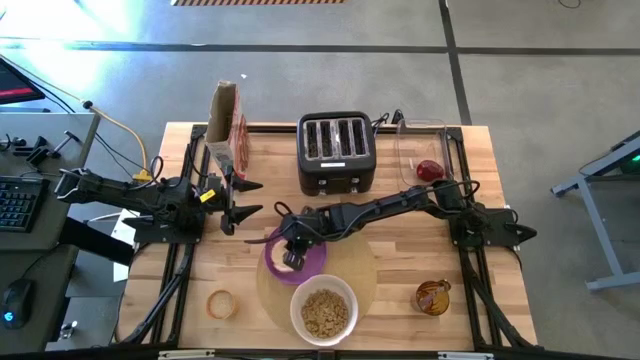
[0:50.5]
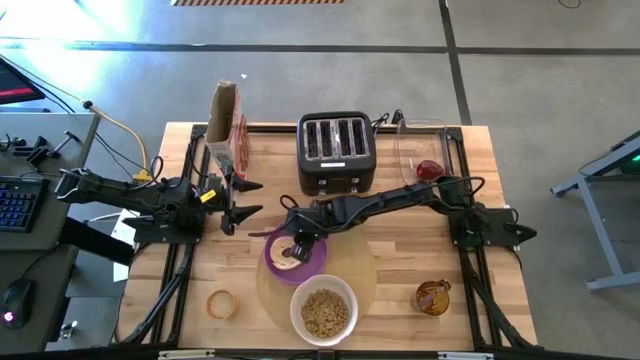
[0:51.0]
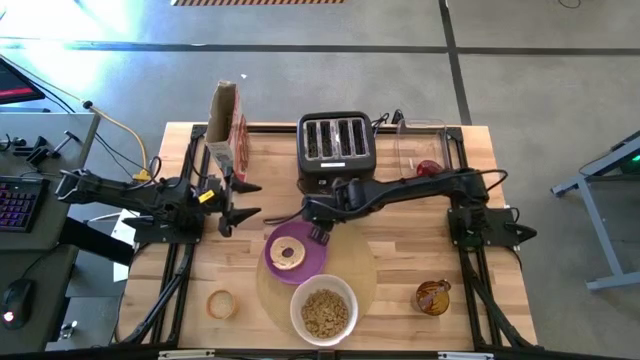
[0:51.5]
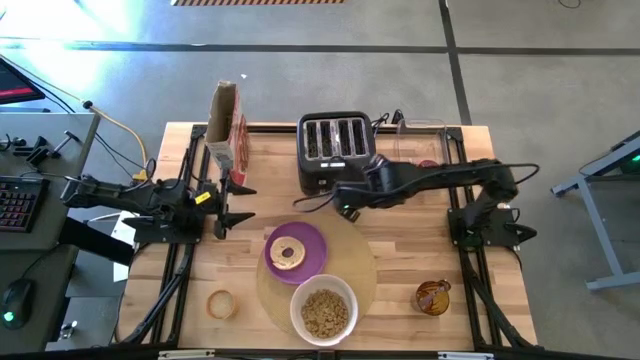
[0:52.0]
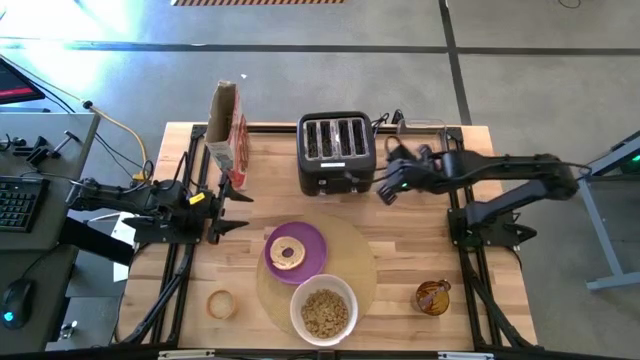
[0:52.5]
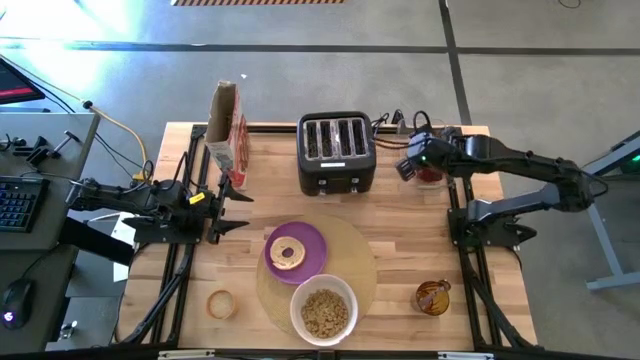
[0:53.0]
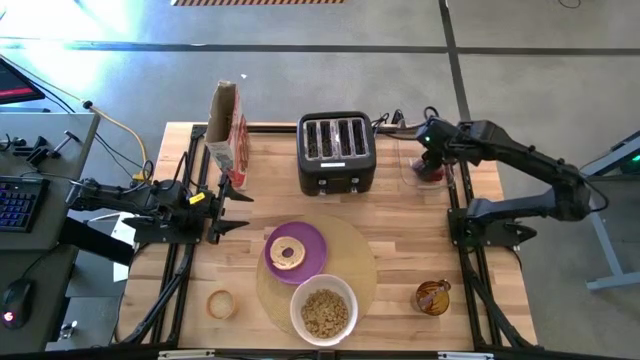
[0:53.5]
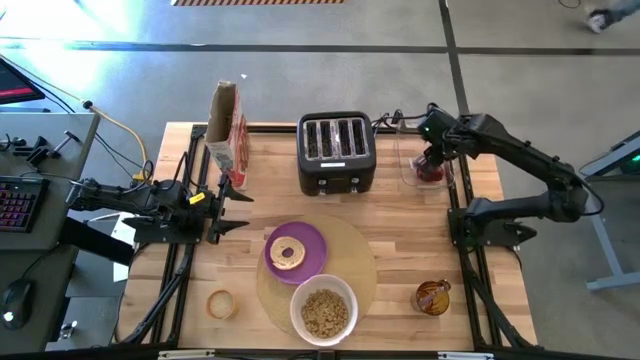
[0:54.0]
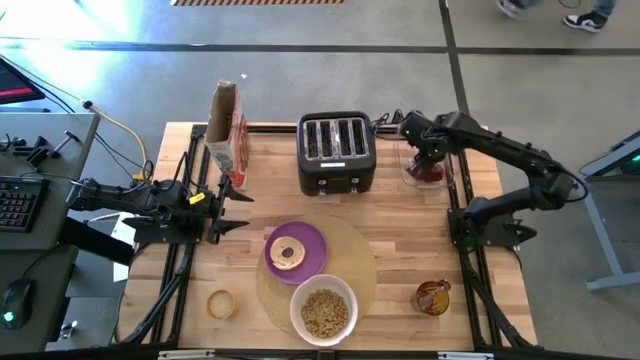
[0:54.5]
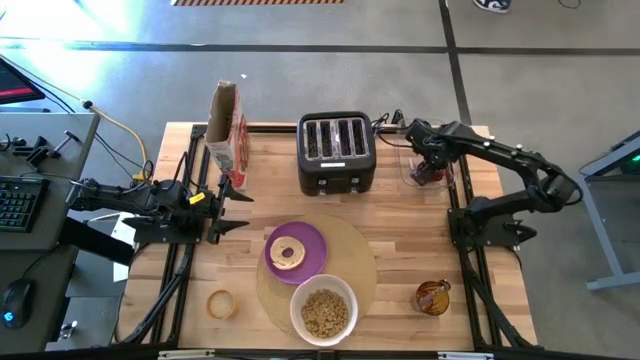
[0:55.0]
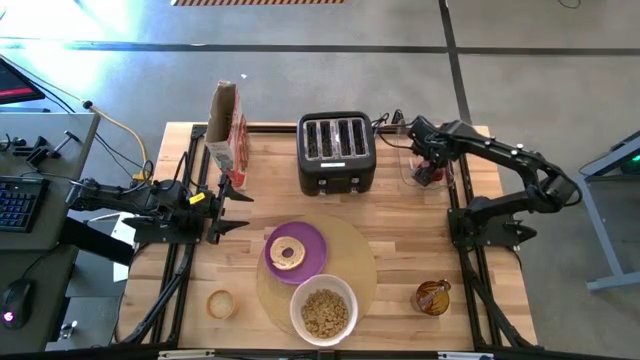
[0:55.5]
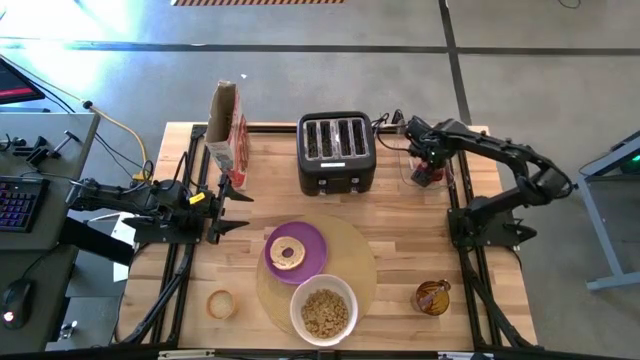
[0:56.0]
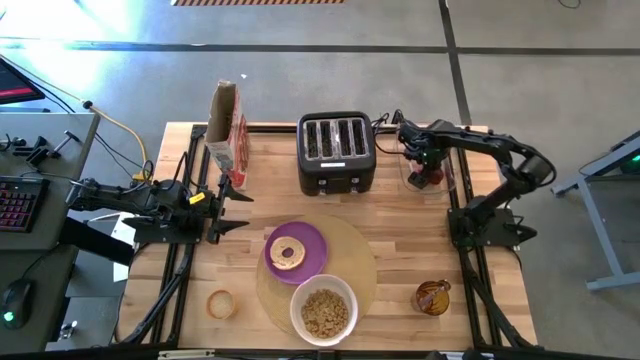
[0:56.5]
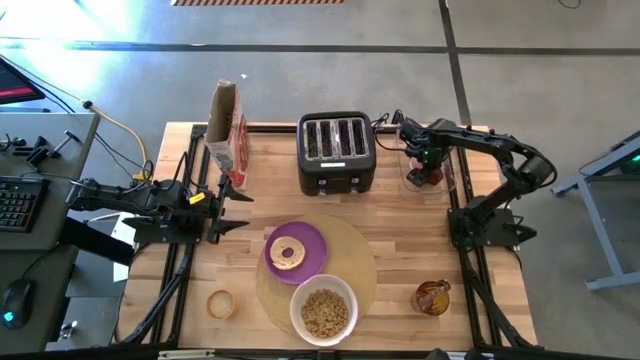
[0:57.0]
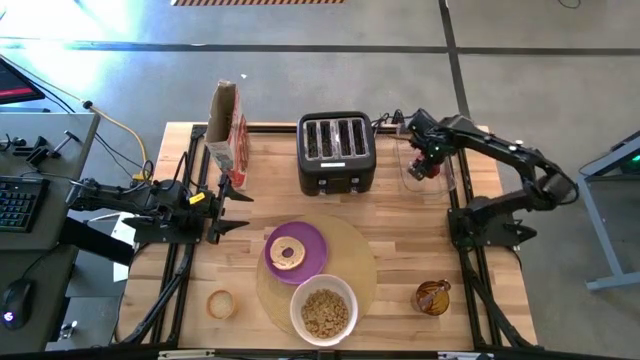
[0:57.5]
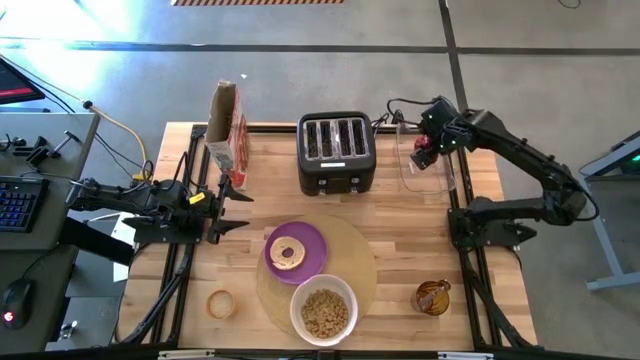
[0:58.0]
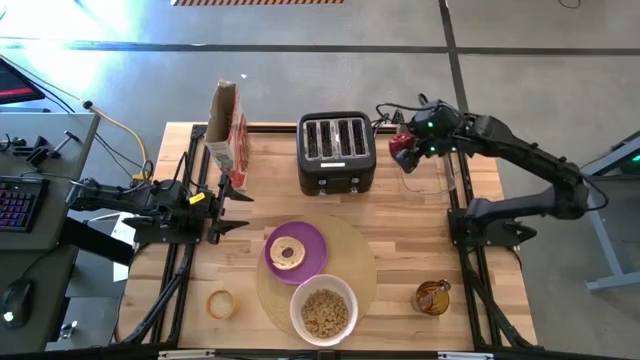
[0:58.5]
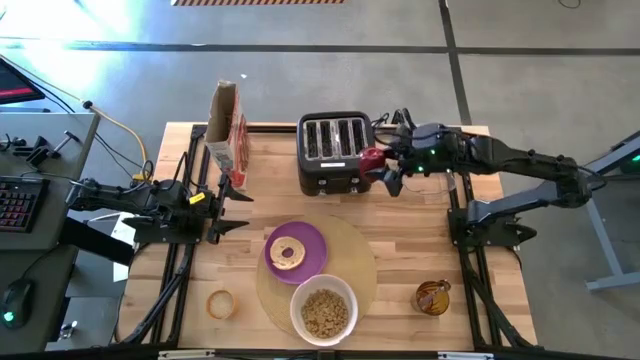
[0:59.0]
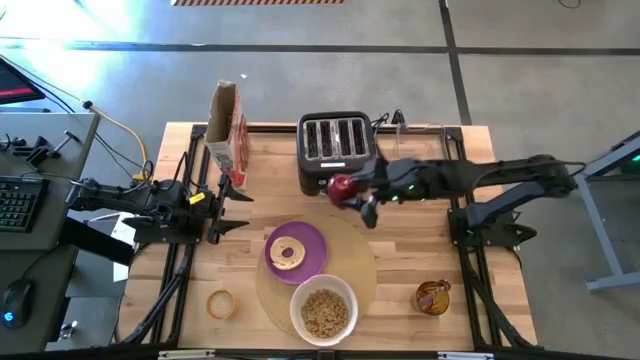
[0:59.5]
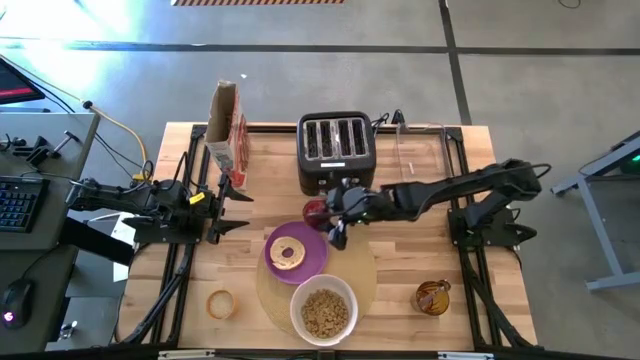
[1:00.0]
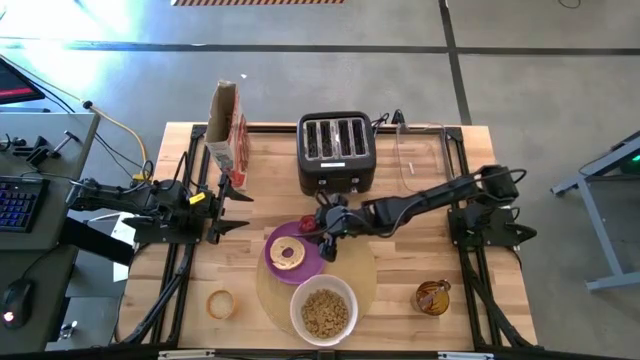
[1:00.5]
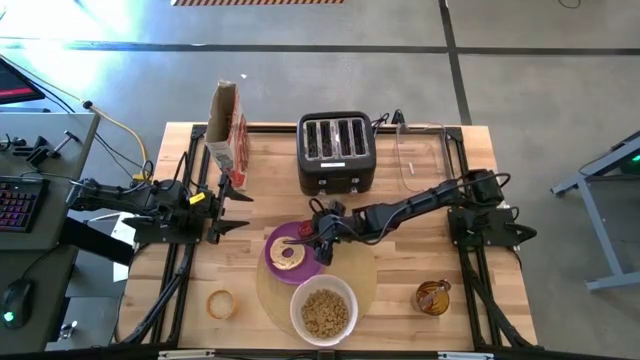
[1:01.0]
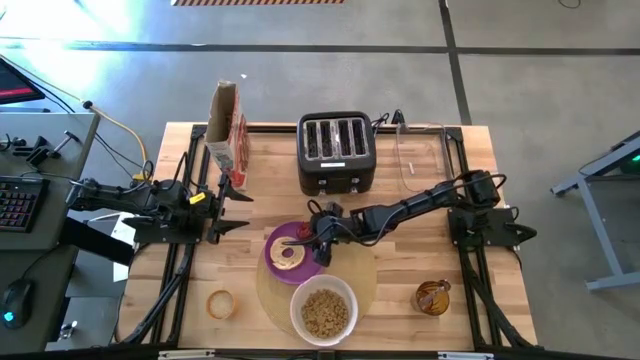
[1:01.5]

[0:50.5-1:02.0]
Task: Arrange a breakfast setting
Put the apple on the violet bowl

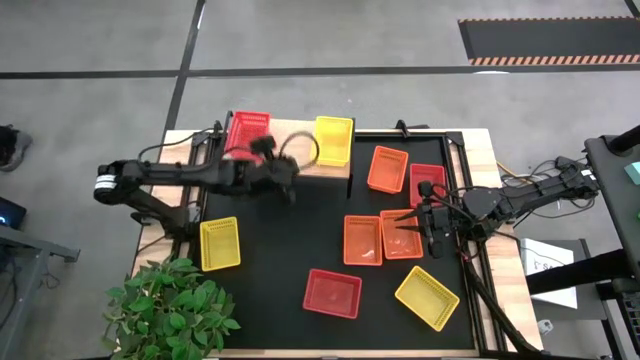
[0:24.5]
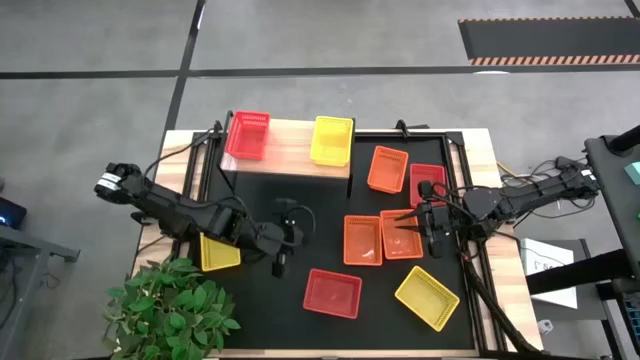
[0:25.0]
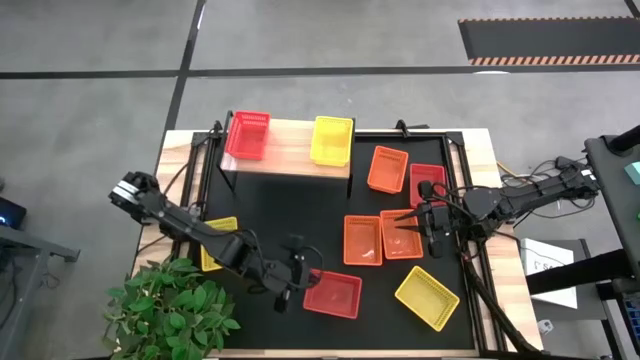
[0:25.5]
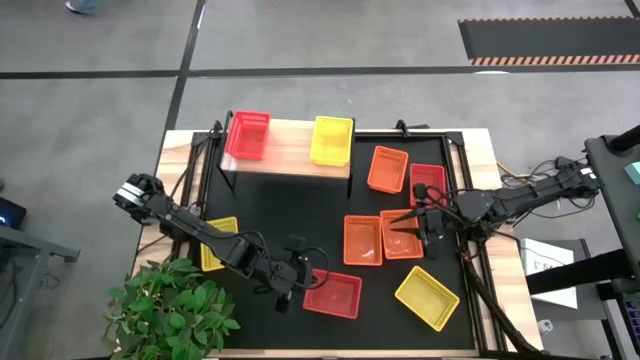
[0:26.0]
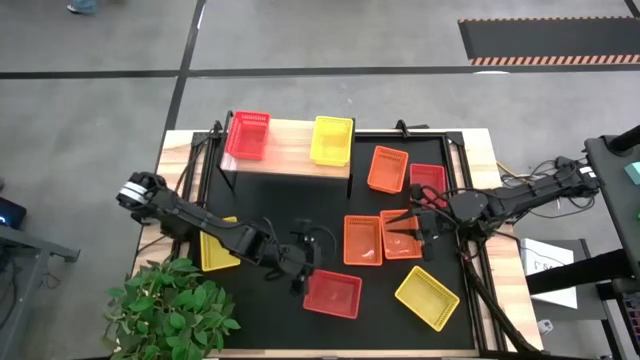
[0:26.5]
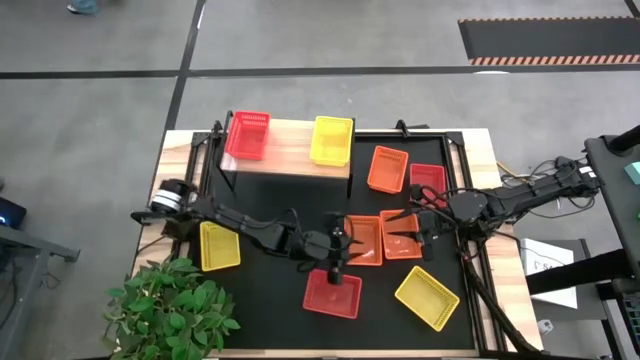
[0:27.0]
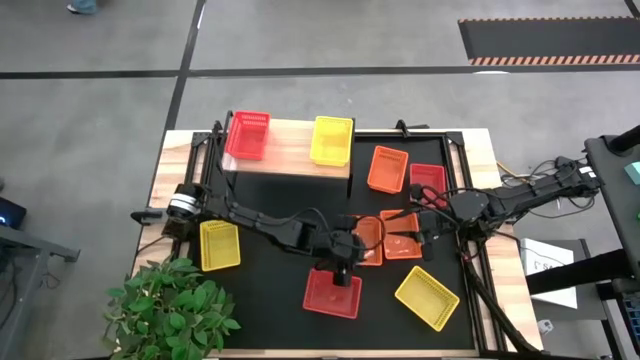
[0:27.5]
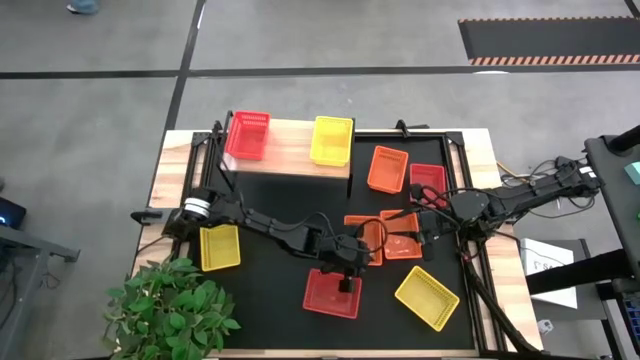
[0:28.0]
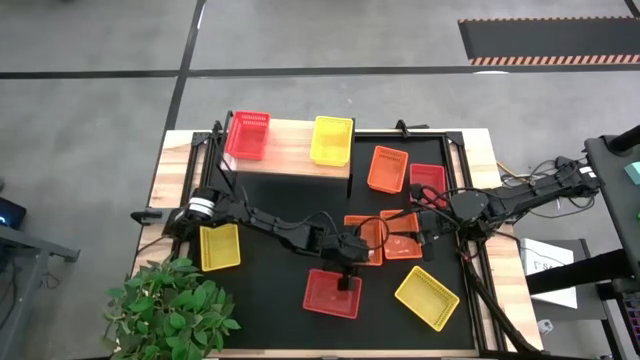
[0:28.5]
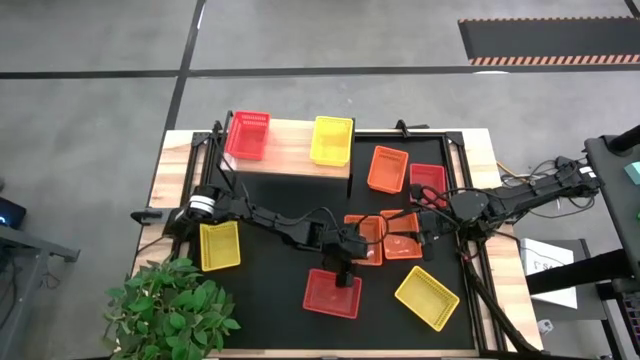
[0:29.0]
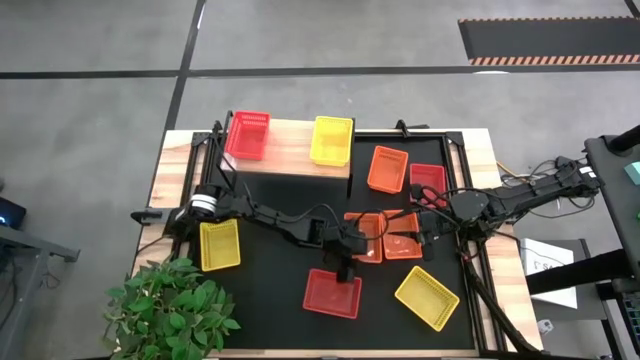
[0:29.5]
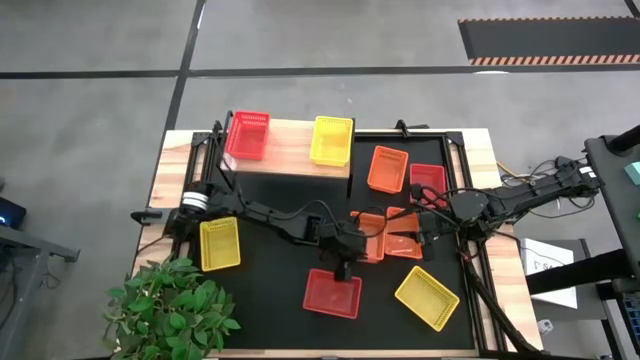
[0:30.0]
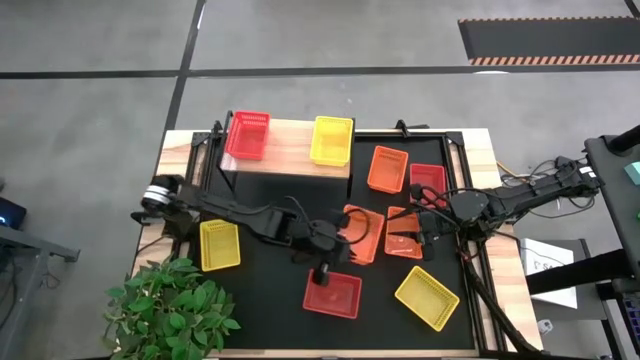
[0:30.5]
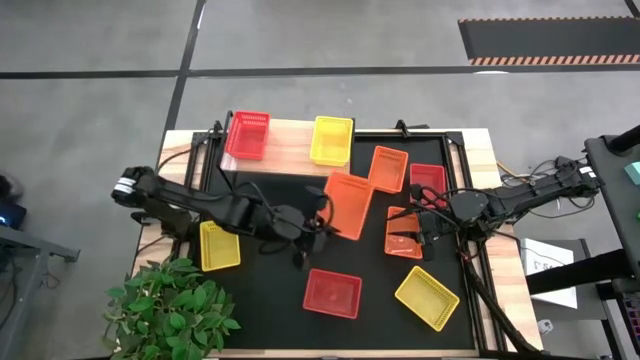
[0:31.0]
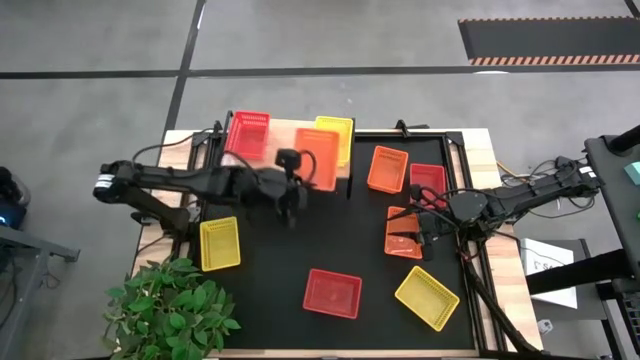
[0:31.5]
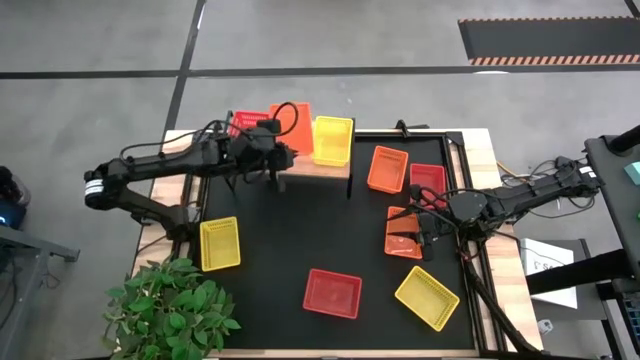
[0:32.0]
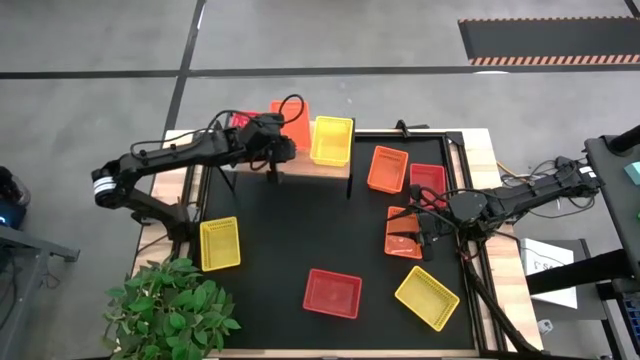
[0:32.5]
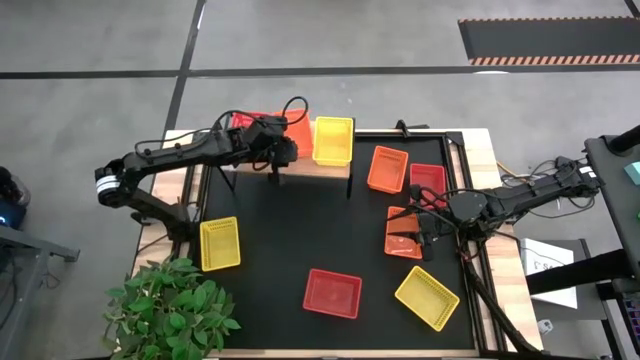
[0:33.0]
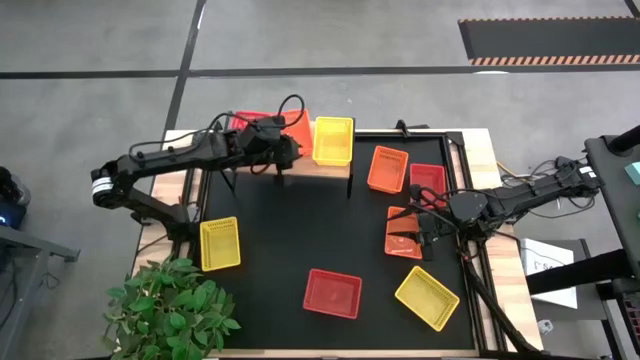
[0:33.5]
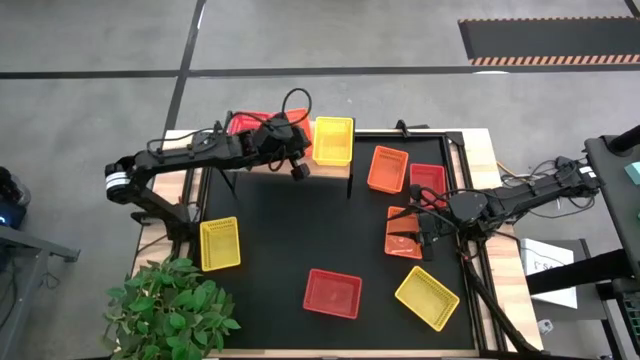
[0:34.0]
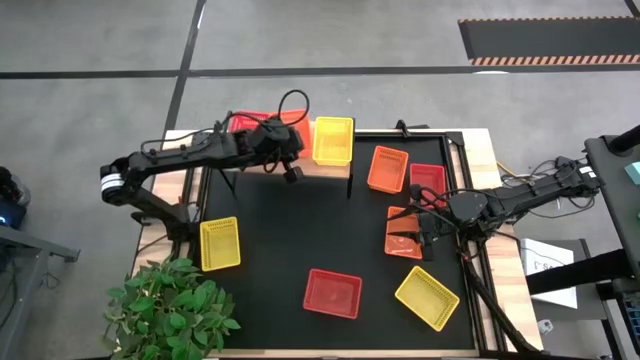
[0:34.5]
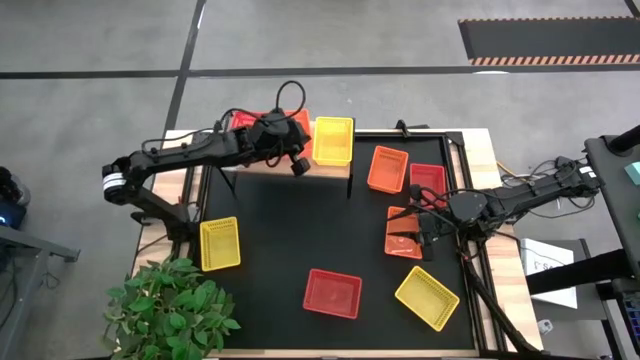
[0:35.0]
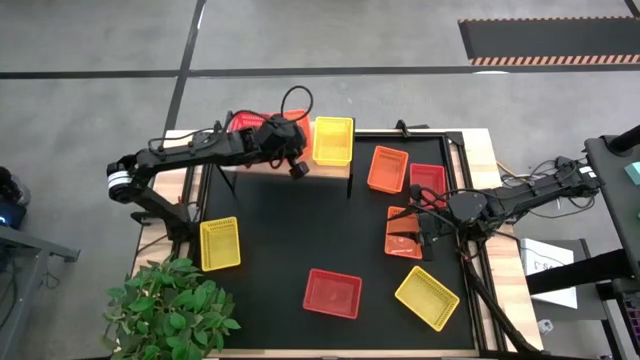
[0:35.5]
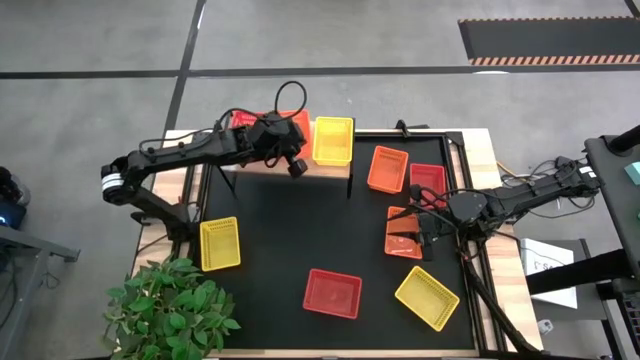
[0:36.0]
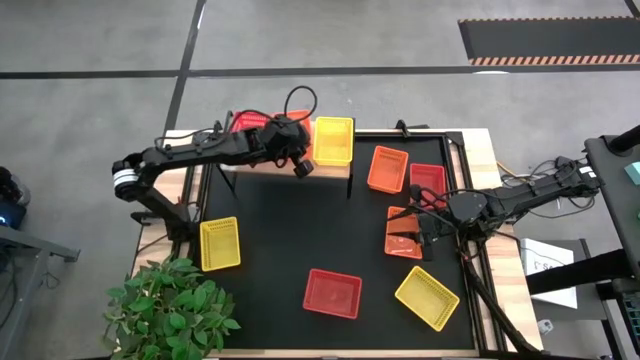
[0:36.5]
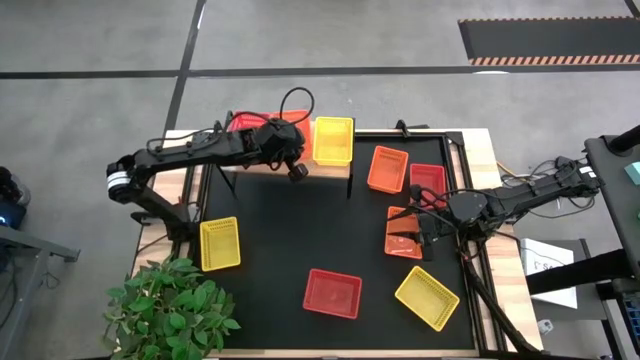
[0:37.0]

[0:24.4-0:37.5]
Task: Stack baskets on shelf by color
Put the left orange bin on the shelf
